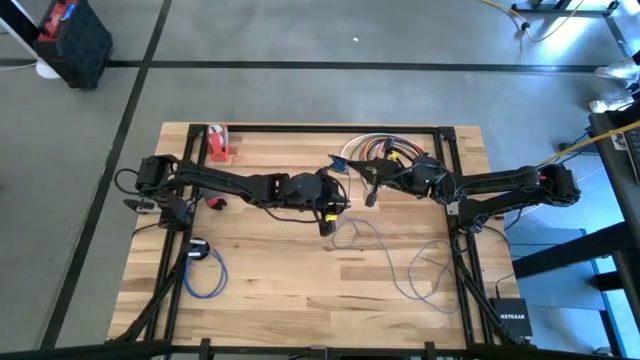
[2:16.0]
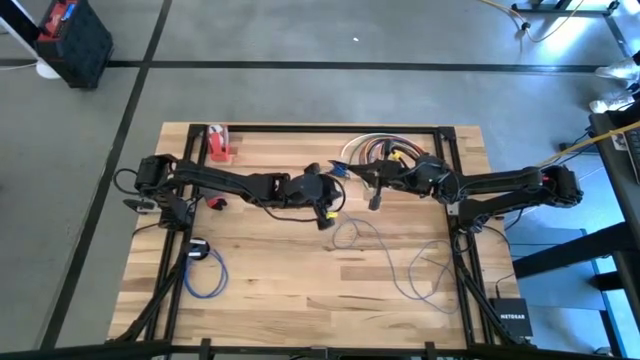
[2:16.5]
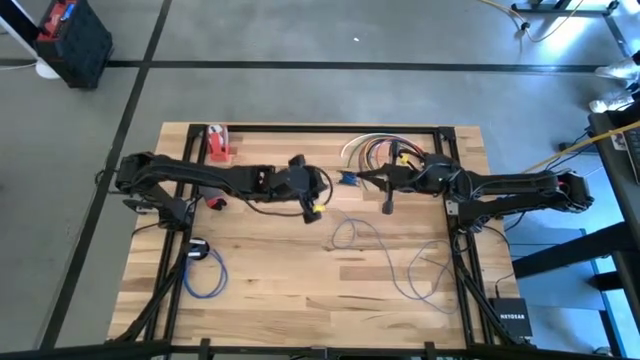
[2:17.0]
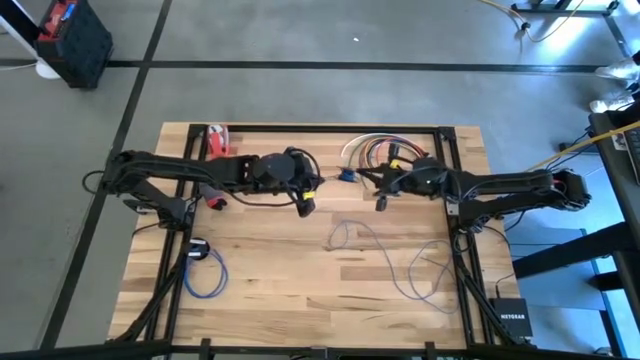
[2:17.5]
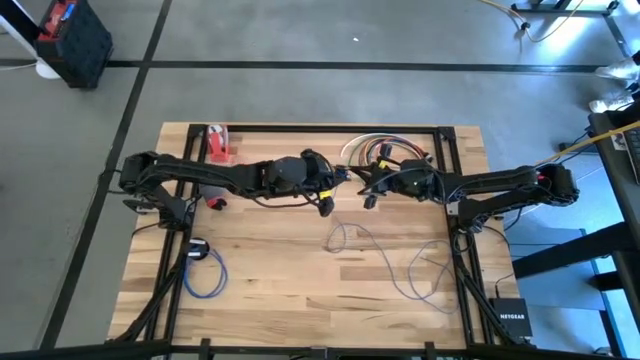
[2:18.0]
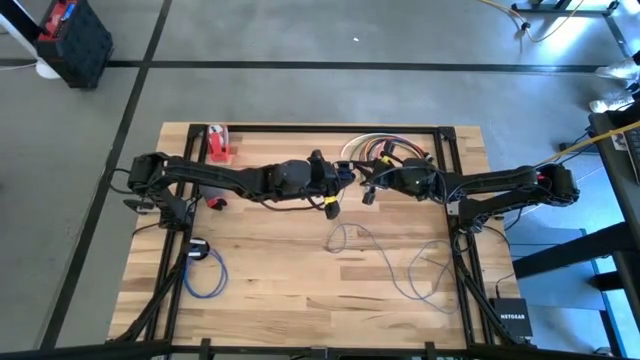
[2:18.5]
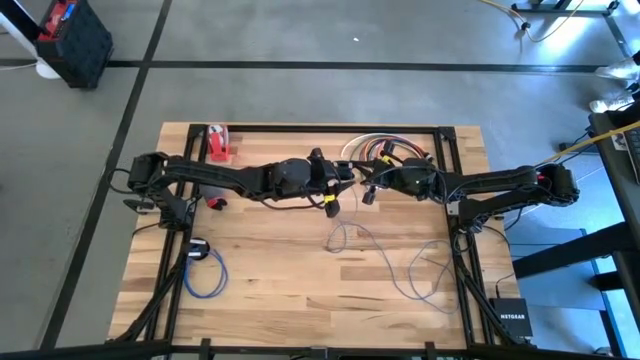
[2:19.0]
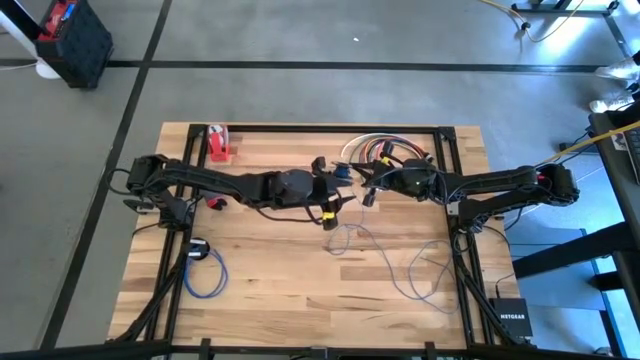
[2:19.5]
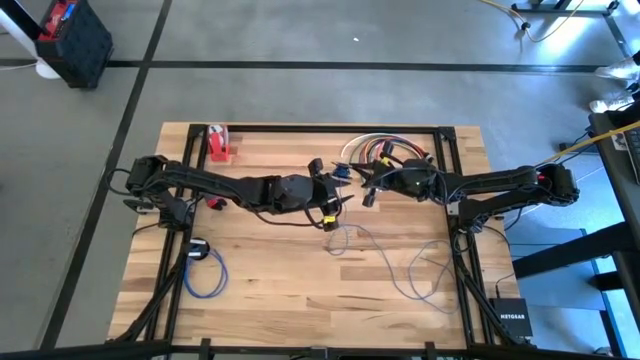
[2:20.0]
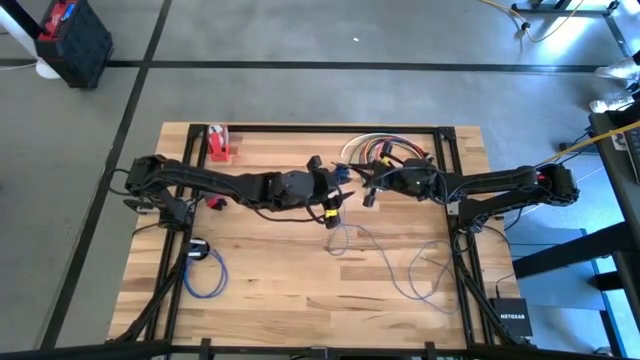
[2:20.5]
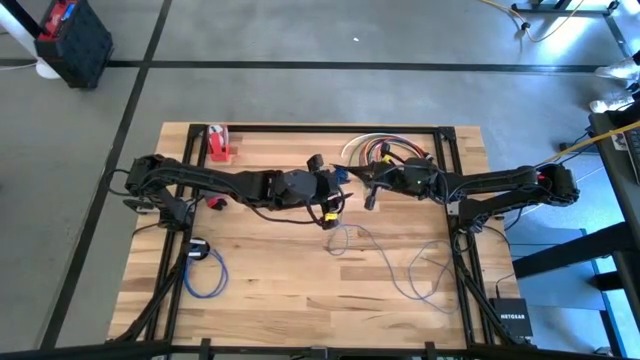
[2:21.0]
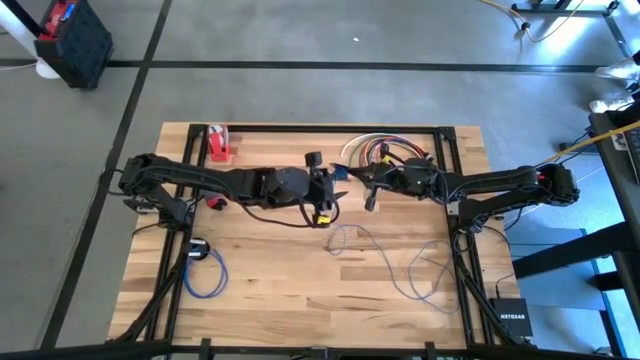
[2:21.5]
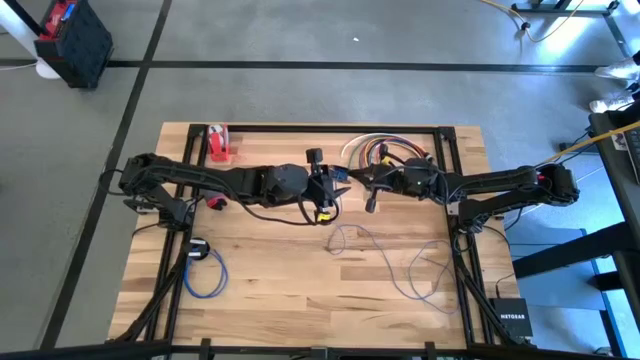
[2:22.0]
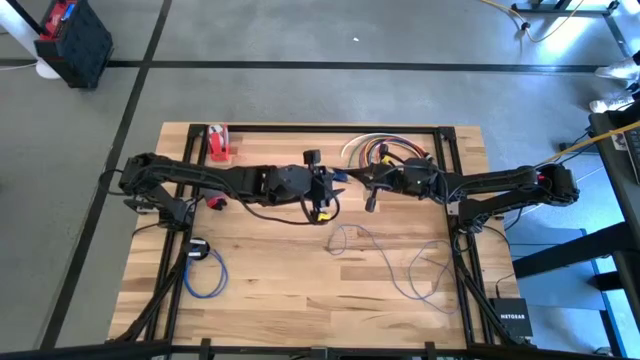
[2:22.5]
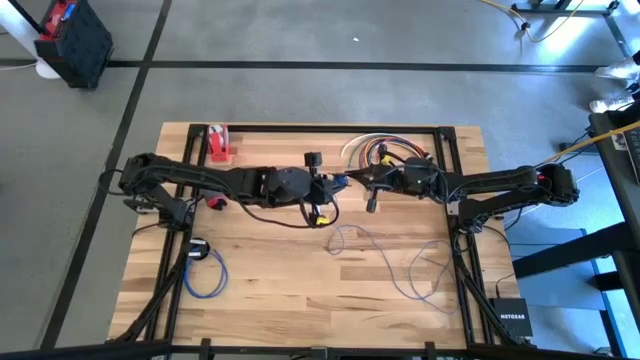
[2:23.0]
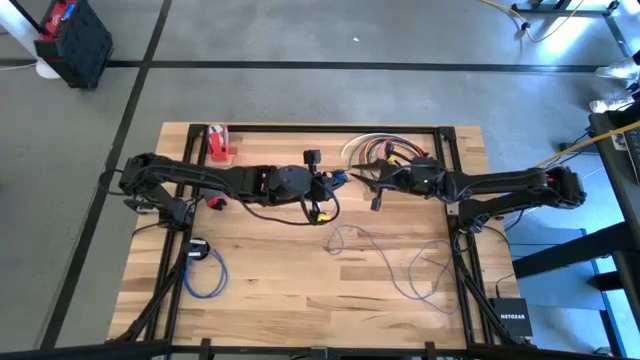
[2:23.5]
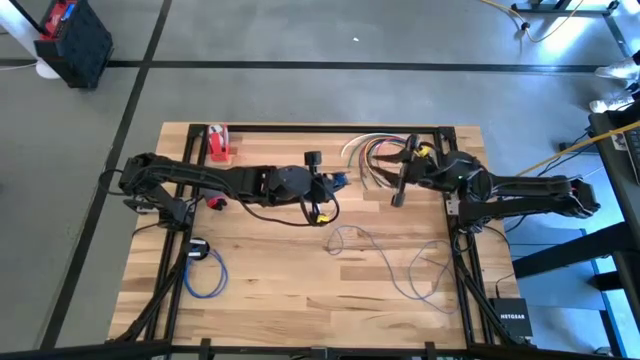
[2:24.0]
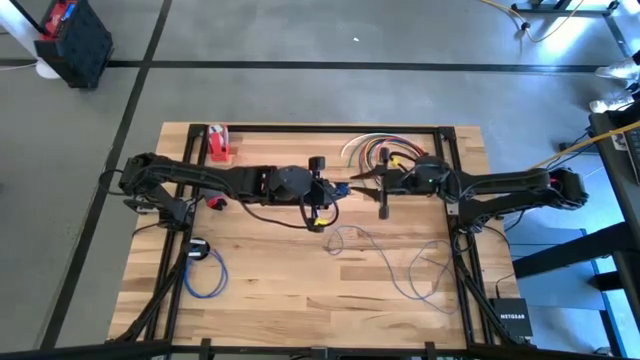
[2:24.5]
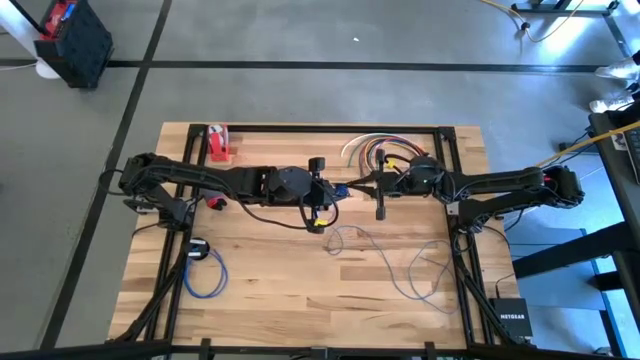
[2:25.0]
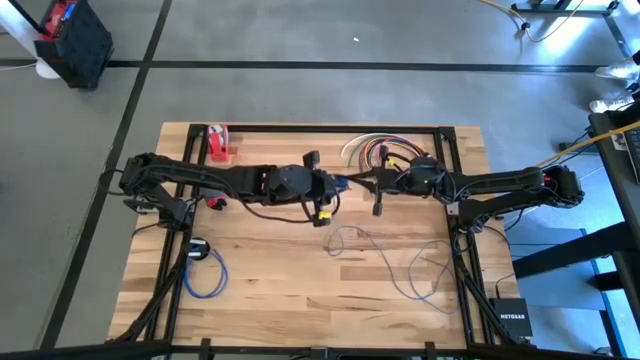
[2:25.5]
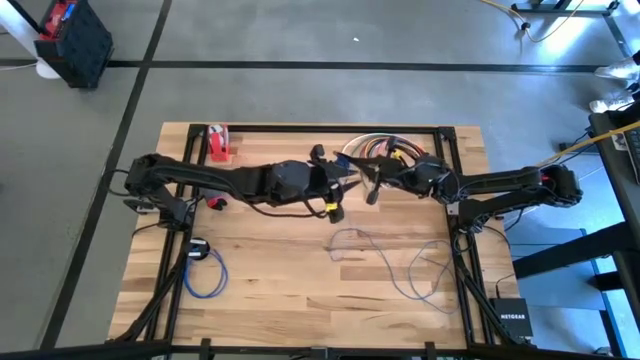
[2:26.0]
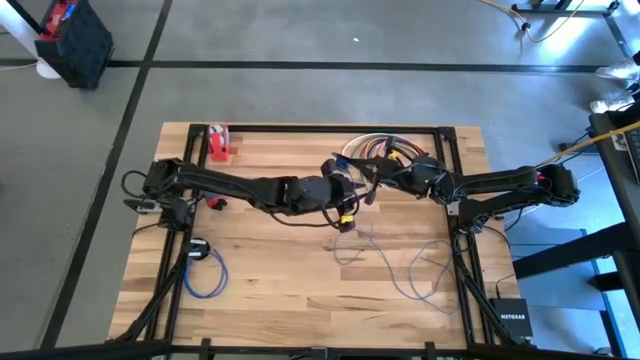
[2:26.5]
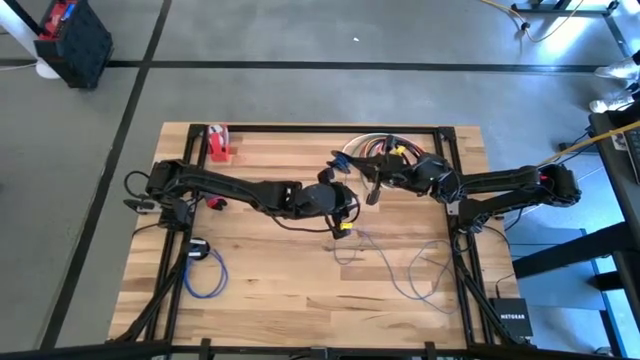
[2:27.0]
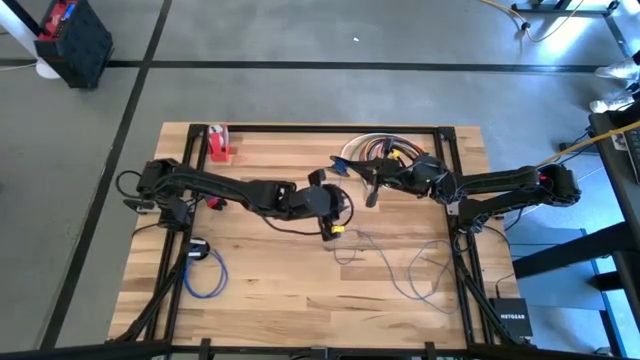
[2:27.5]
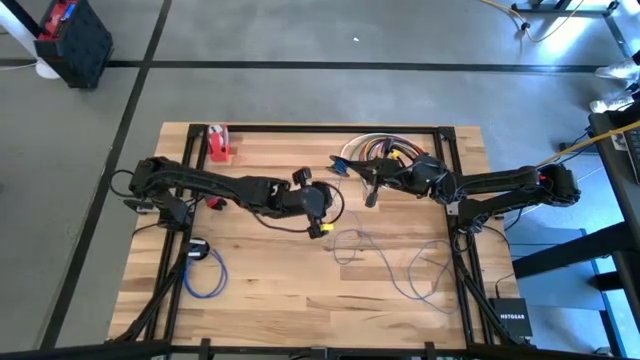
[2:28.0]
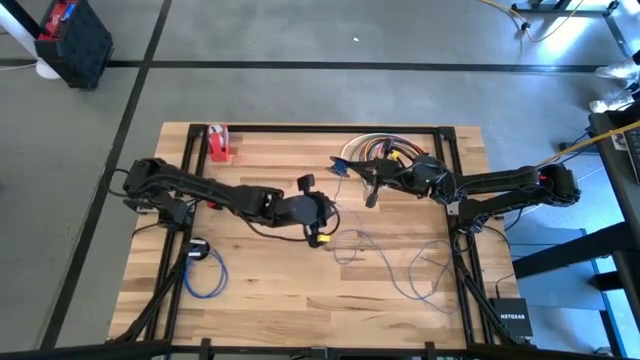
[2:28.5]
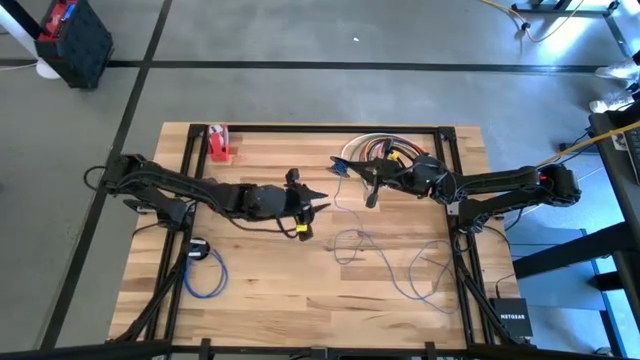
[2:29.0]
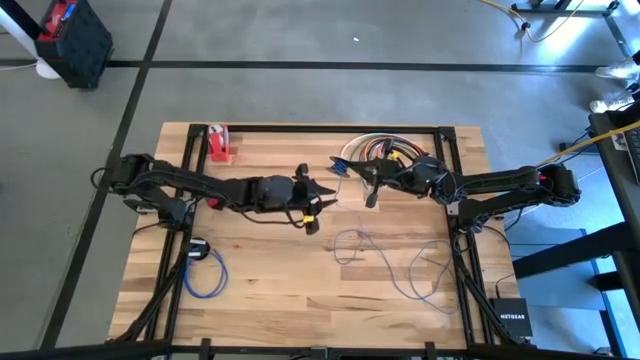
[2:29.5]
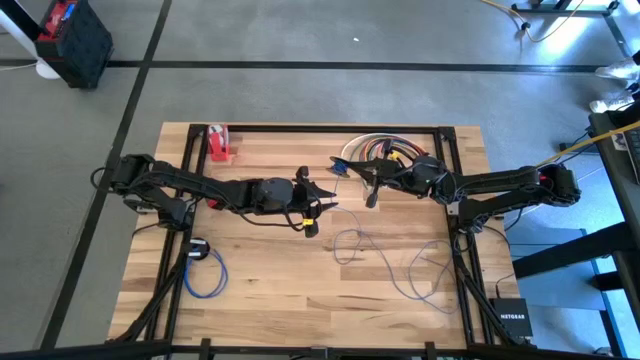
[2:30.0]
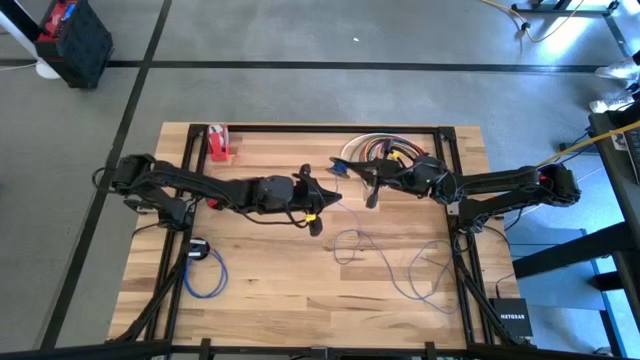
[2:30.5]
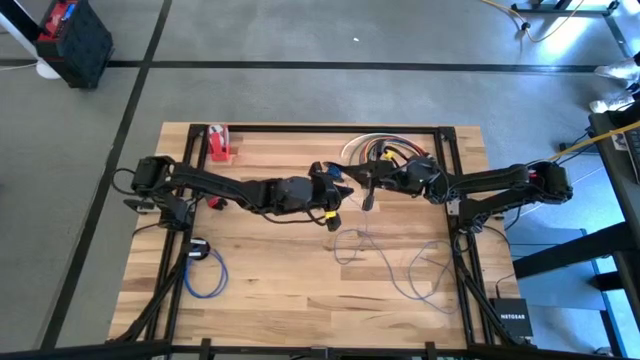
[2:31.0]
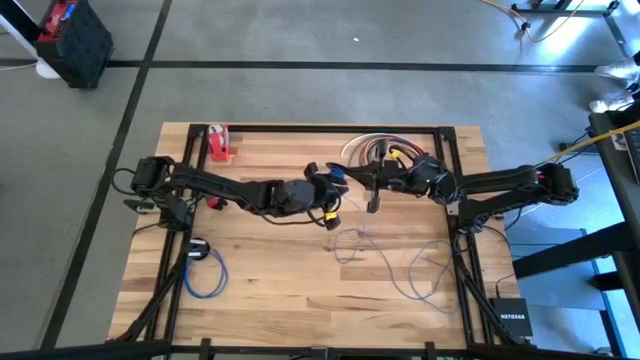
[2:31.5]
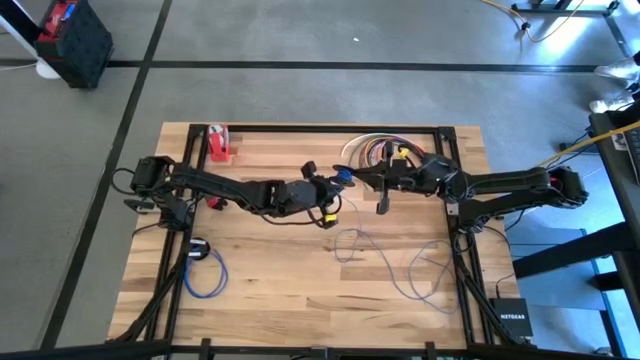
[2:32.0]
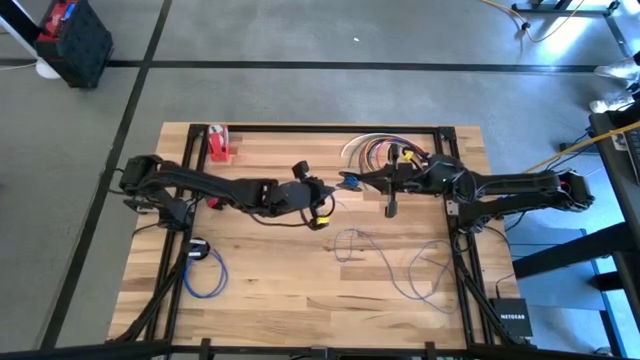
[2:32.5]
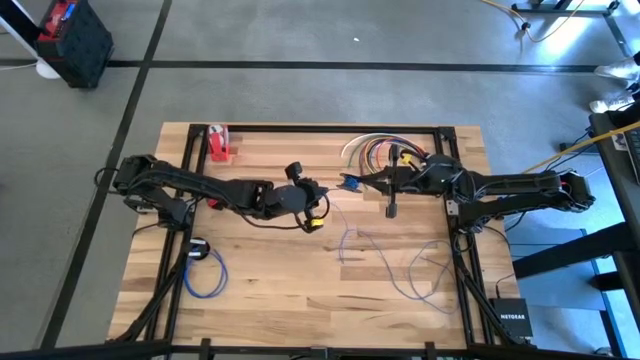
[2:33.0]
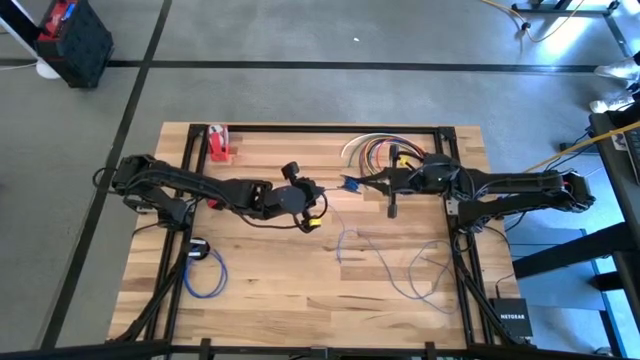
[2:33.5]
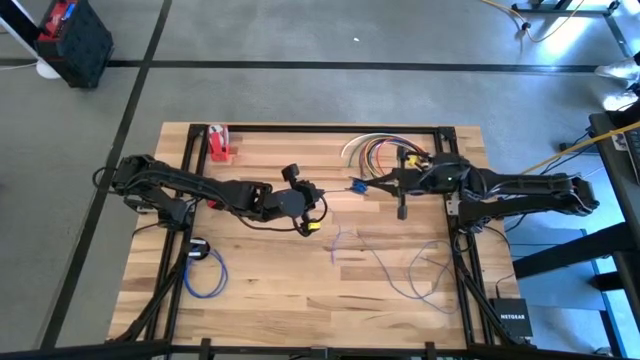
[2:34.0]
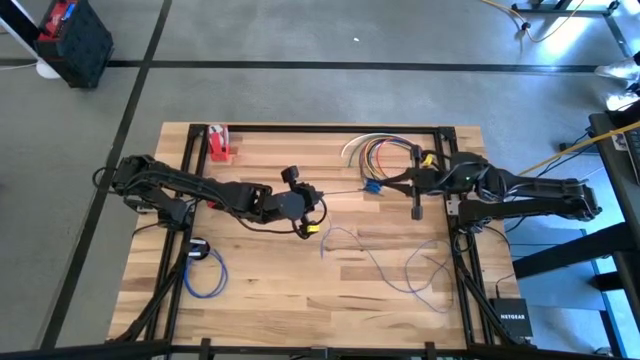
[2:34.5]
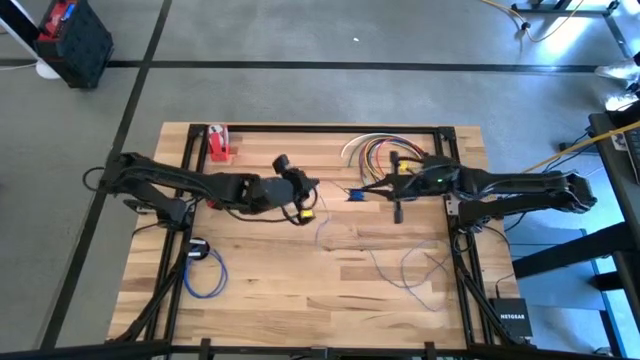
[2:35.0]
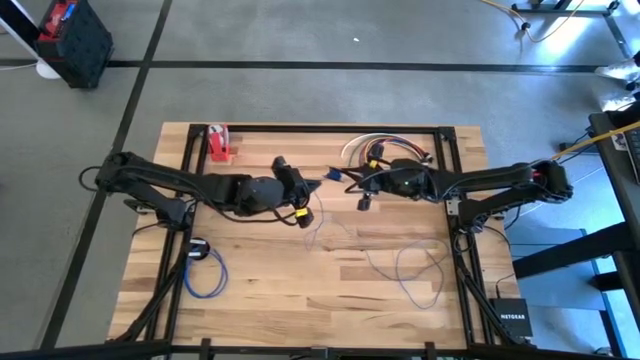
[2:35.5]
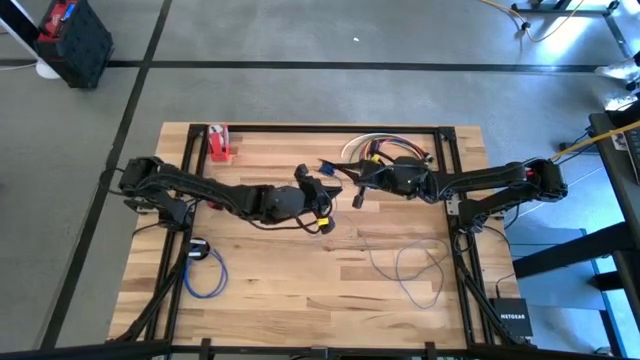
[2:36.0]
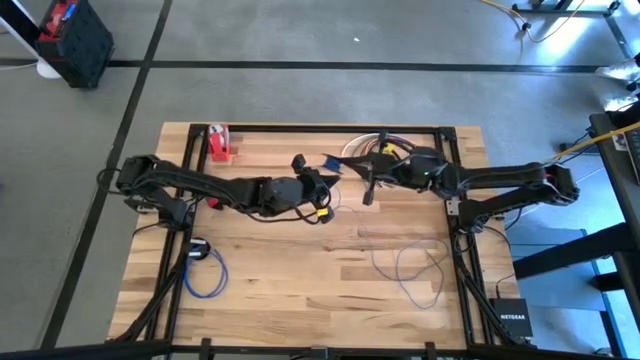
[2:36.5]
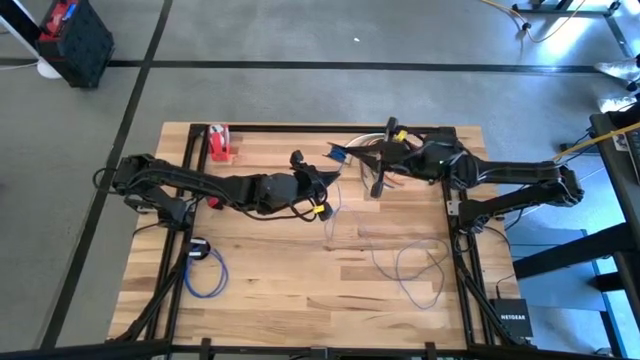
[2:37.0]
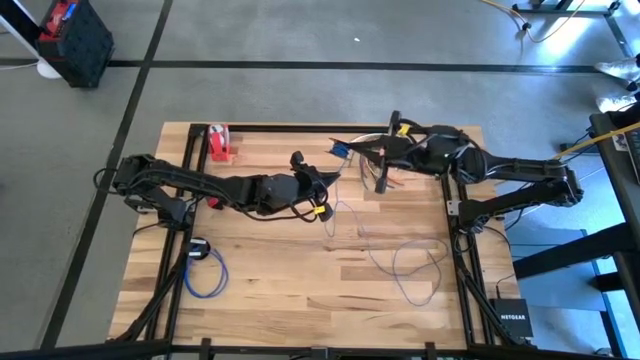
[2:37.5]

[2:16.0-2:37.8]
Task: Coil cords
Coil the blue cable wire on the black spool
